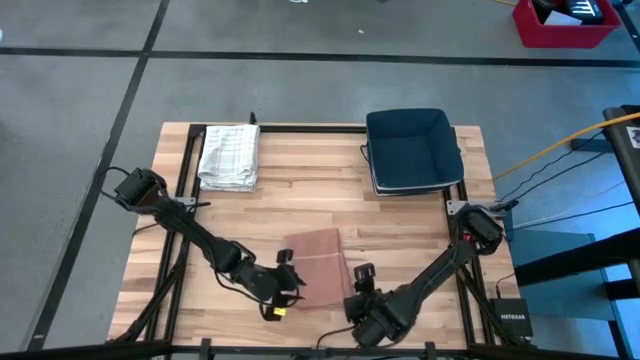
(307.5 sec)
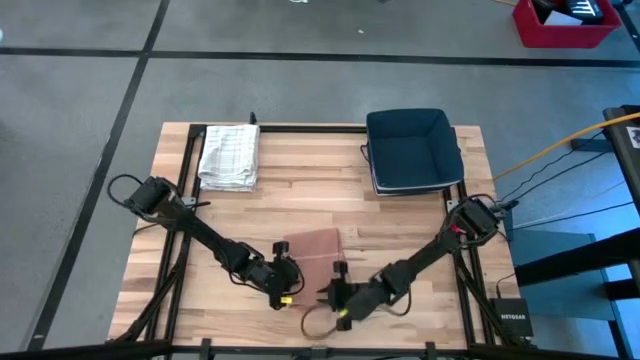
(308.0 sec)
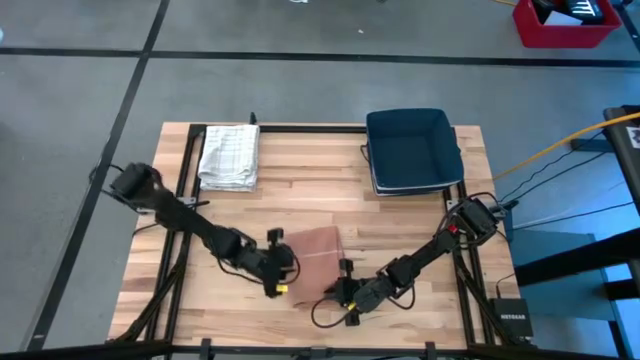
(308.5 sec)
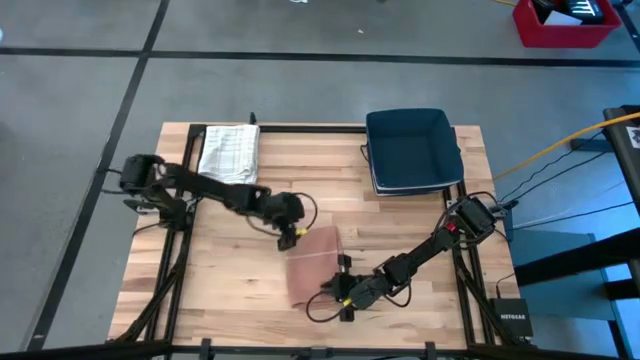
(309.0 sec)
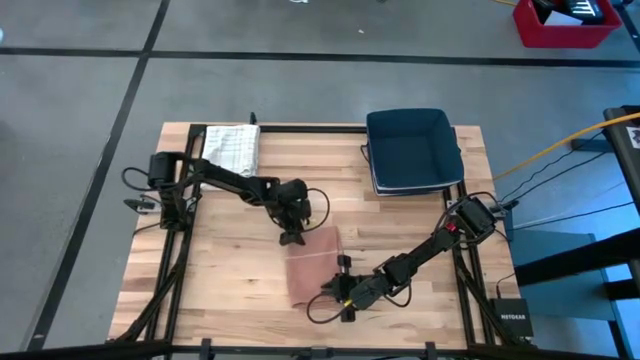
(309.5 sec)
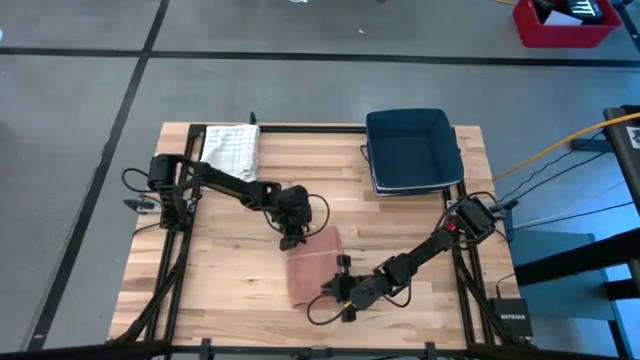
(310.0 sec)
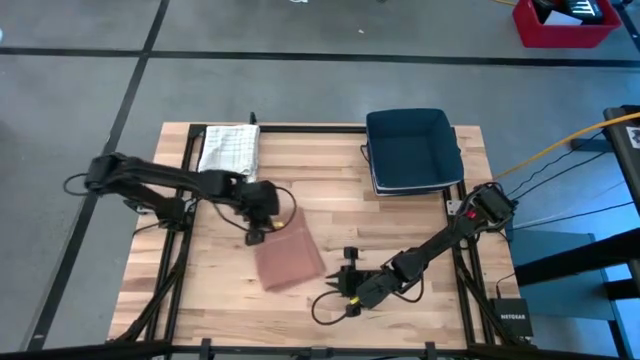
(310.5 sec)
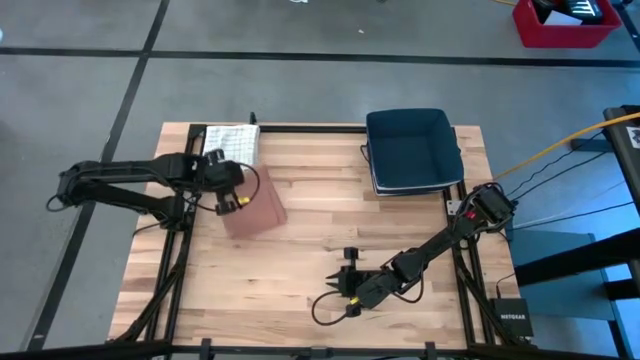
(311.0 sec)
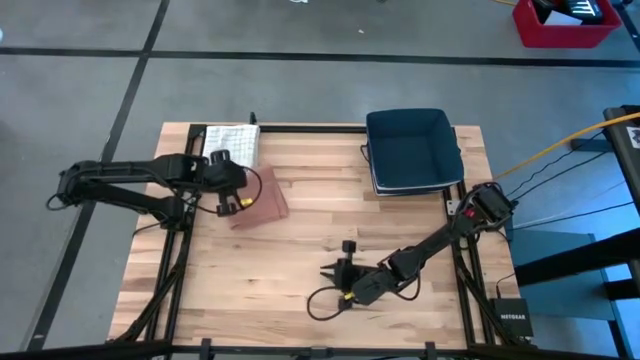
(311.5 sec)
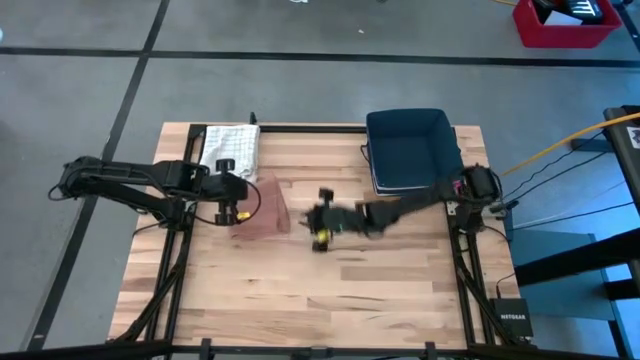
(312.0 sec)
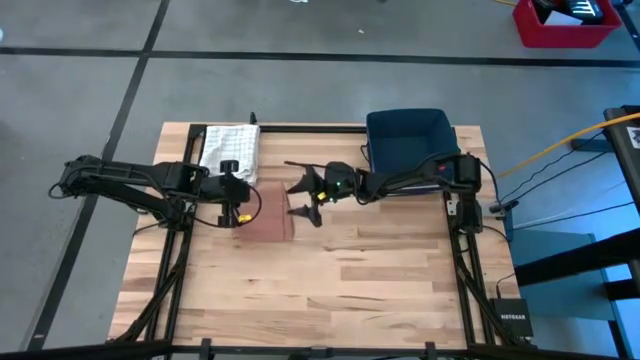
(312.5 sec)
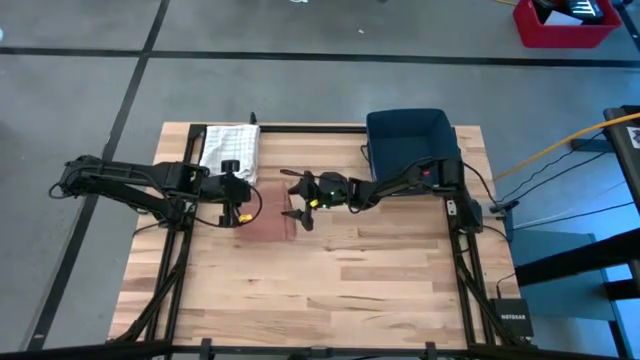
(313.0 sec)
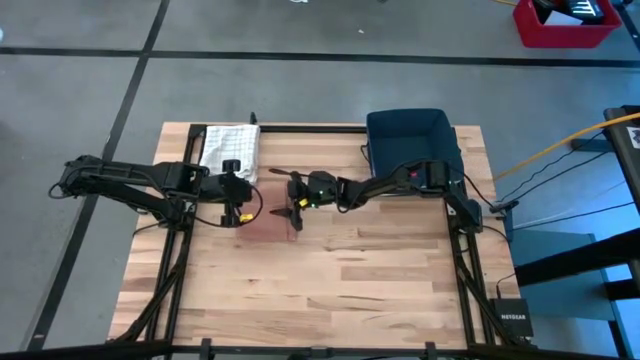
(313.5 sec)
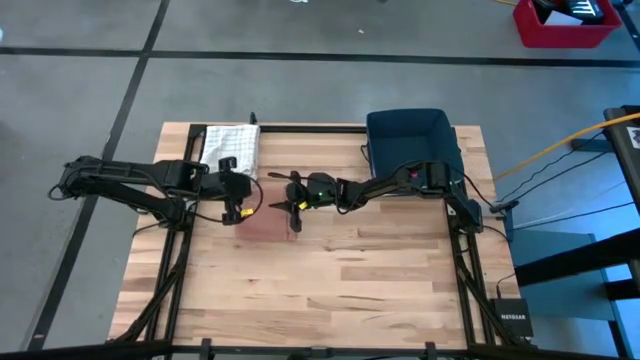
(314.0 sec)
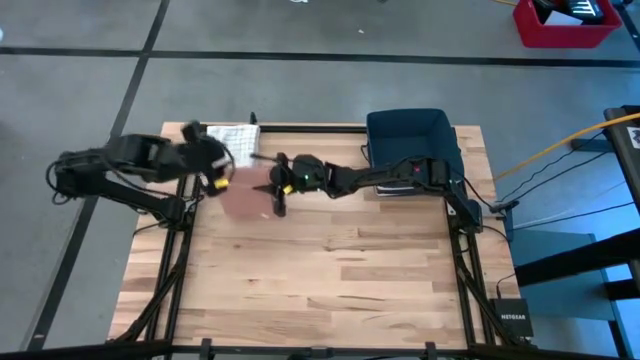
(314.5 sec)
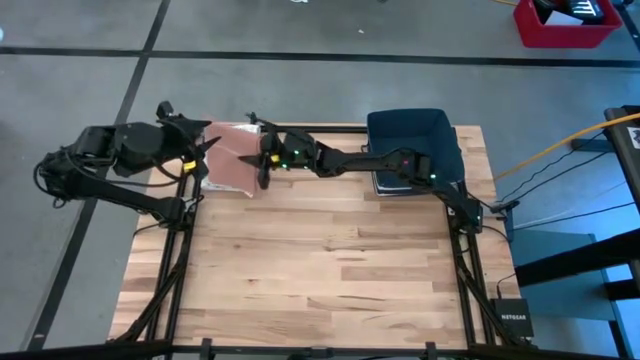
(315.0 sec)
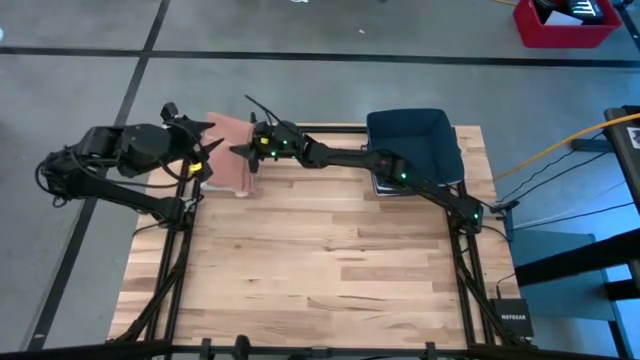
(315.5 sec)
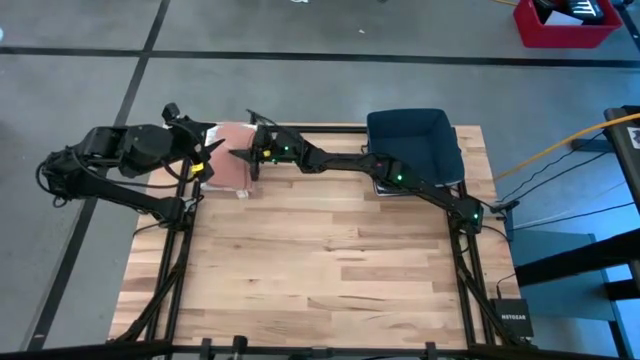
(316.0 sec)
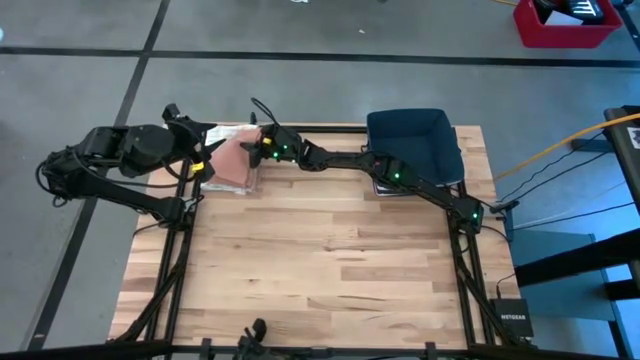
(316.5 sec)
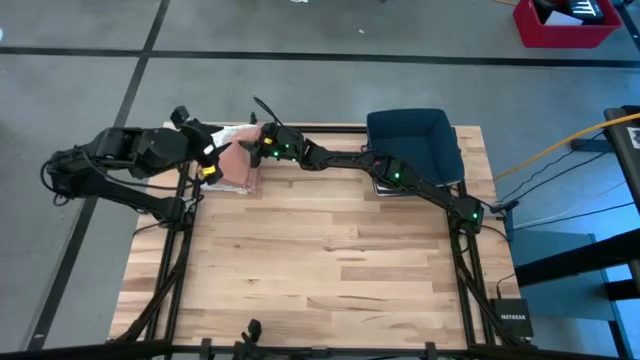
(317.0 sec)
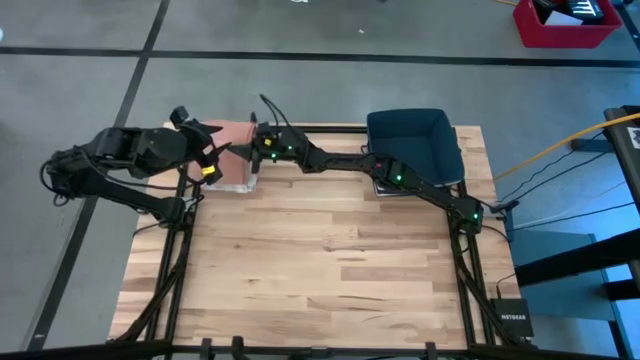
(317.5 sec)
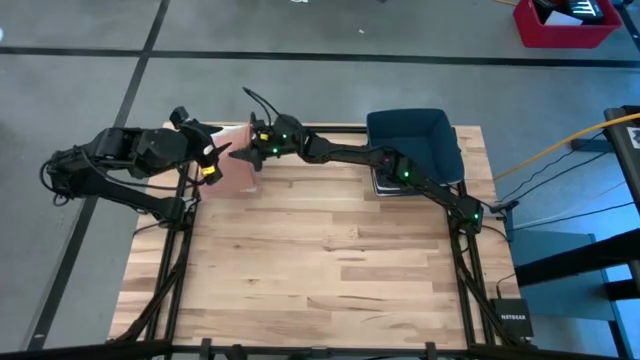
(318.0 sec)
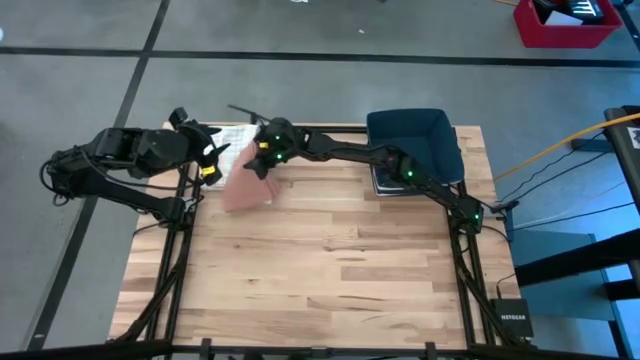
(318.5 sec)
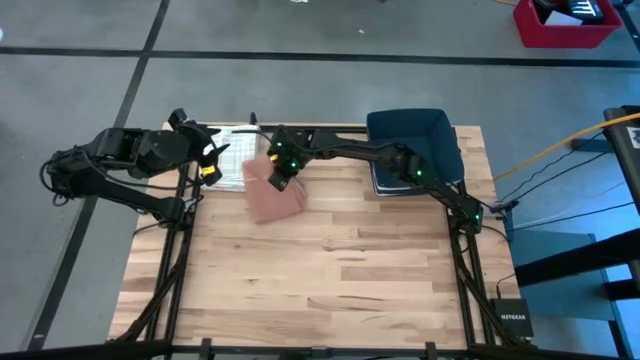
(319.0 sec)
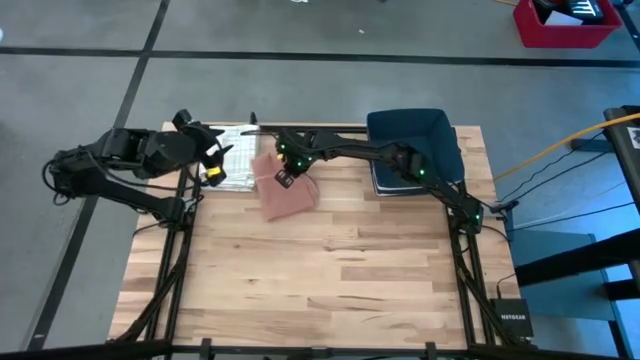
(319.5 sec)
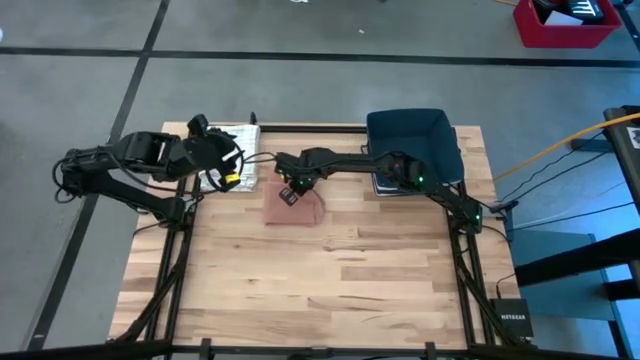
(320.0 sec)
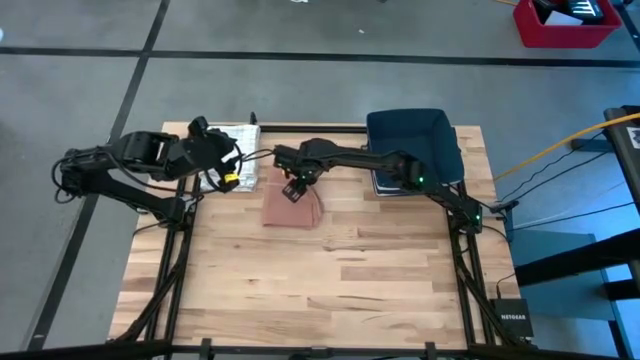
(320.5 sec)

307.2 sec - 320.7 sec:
Task: Fold towel
Put the brown towel on the top center of the table

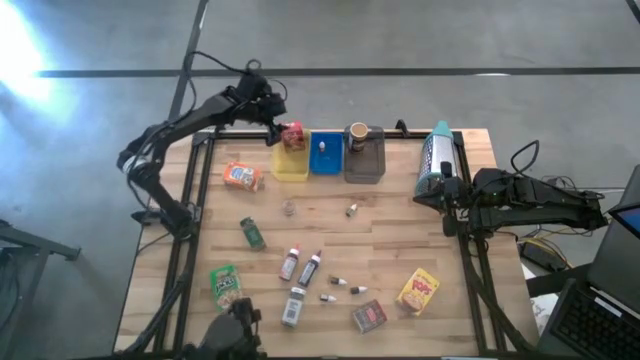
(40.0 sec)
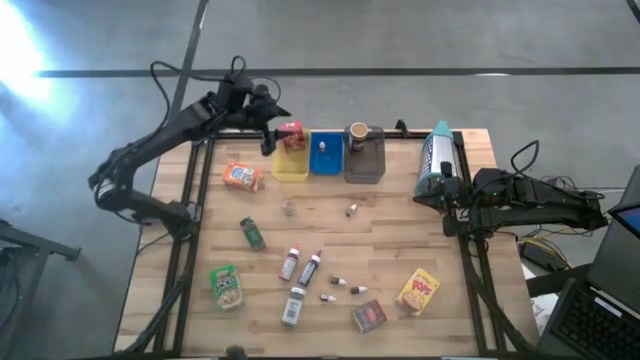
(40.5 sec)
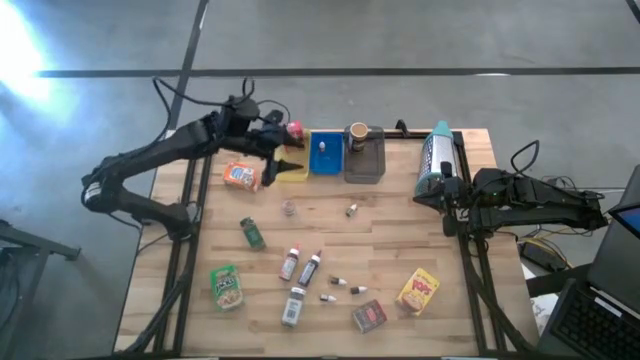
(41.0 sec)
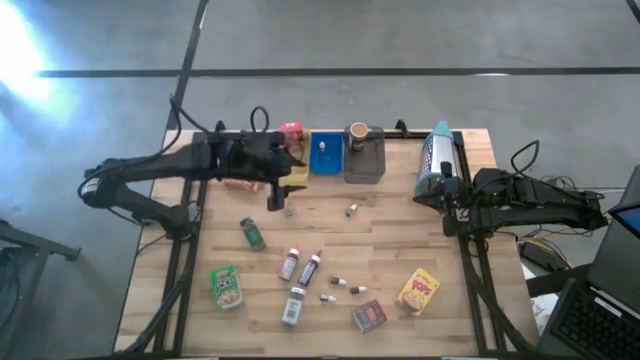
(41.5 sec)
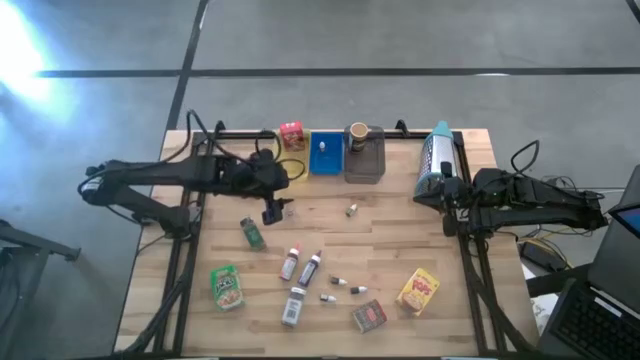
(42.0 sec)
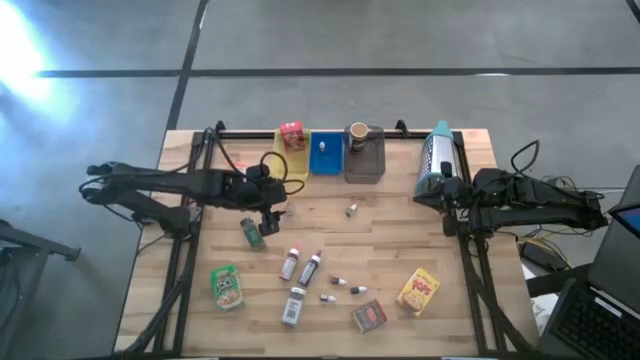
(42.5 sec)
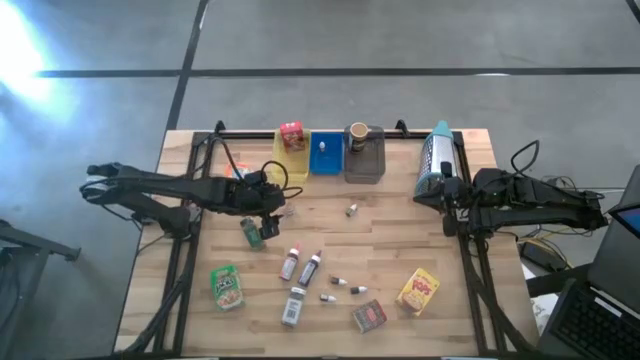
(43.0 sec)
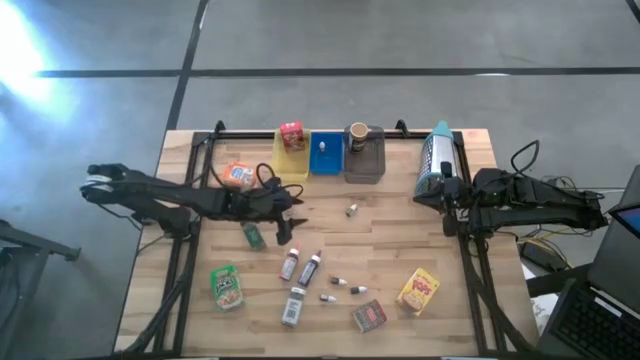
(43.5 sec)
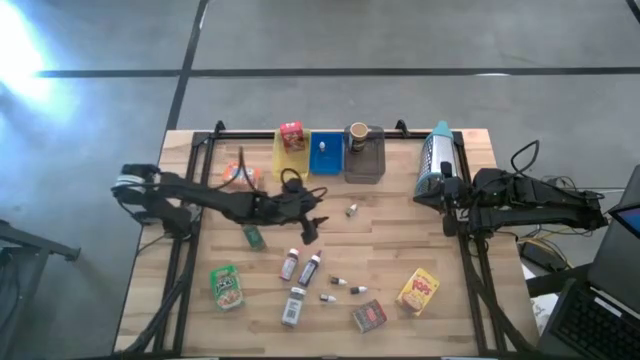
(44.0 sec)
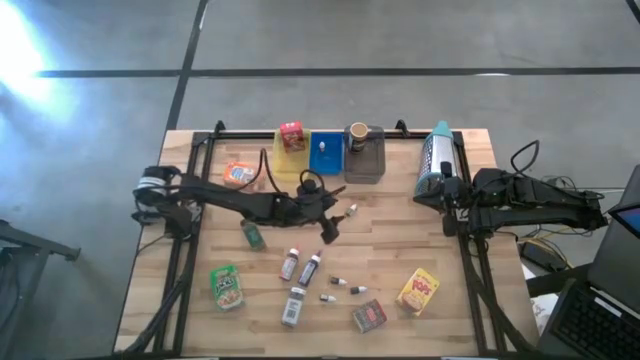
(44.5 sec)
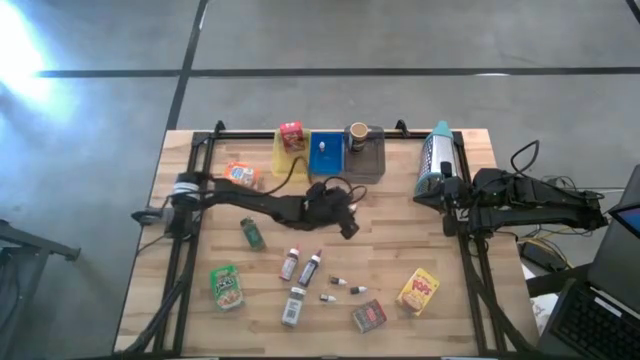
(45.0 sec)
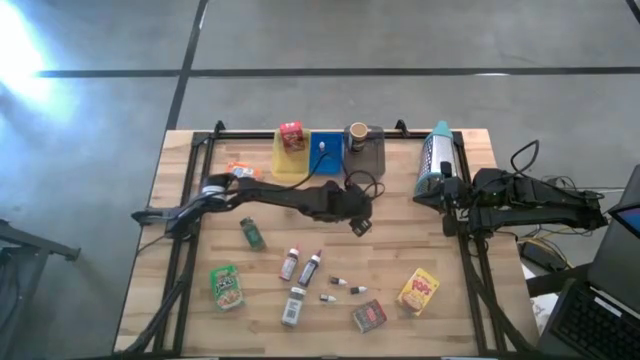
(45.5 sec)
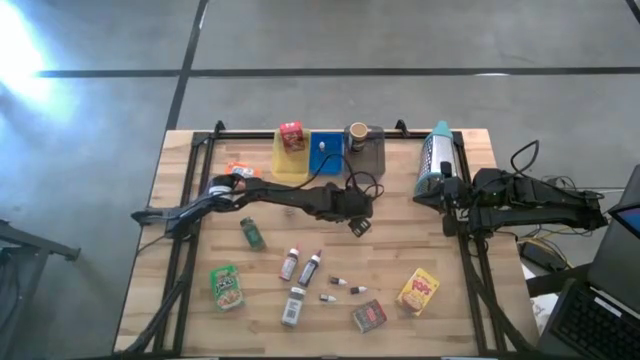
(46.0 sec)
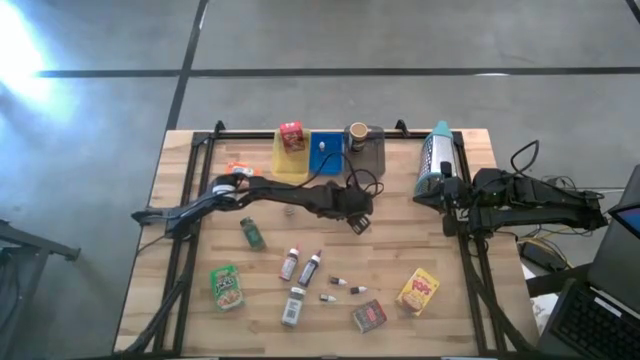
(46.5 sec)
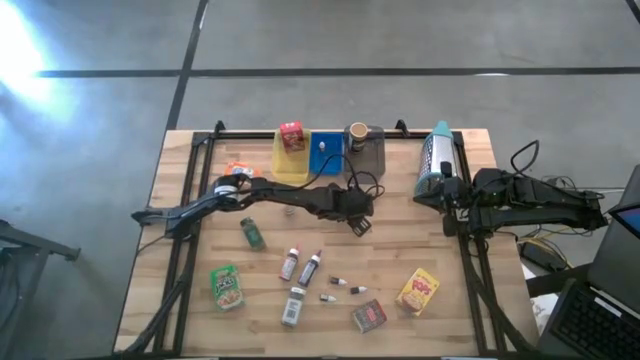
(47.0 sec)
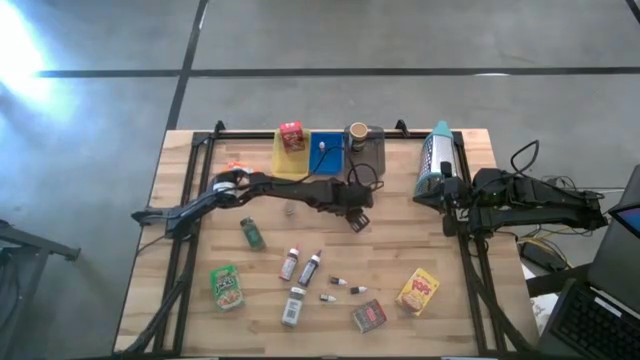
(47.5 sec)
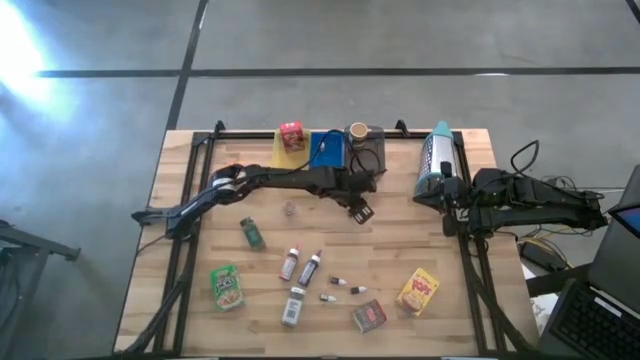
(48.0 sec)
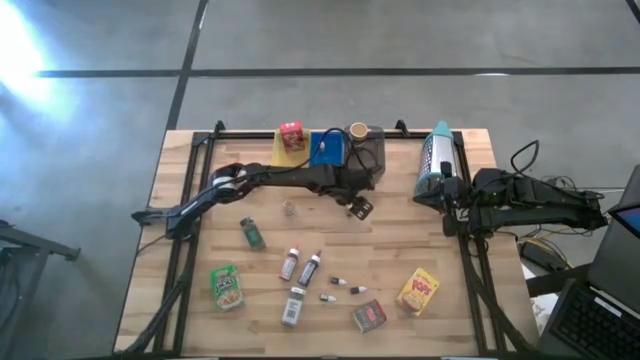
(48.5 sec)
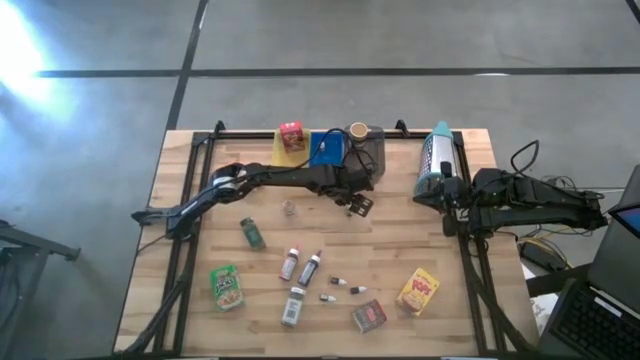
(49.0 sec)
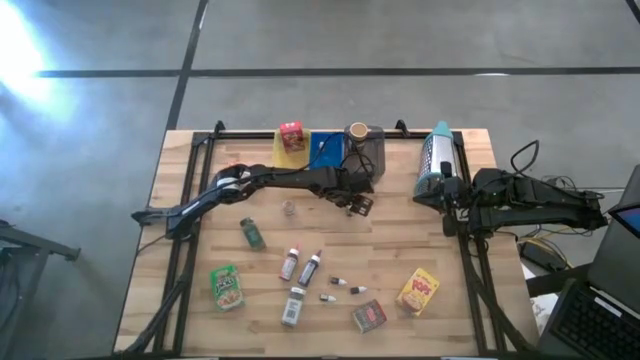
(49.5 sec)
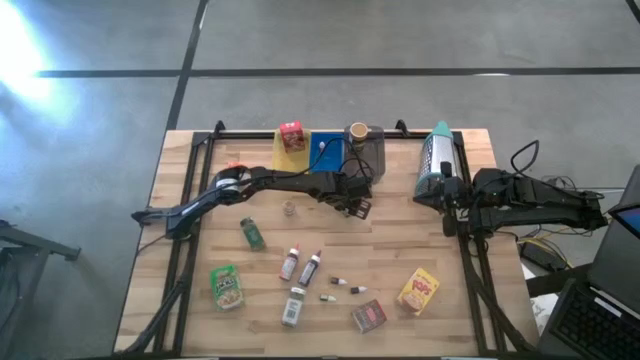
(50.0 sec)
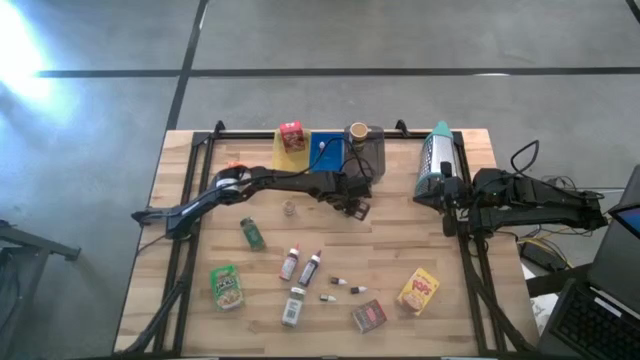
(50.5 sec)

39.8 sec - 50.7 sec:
Task: Pick & Place Kitchen Items
Put the small green food coloring bottle into the blue bin
